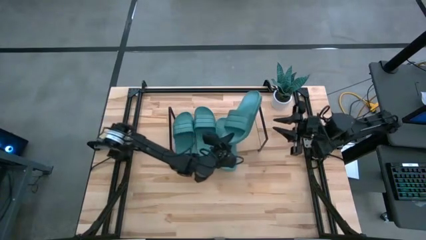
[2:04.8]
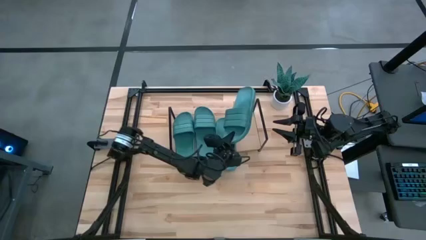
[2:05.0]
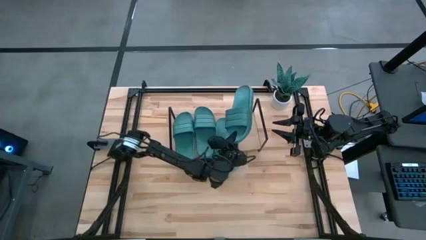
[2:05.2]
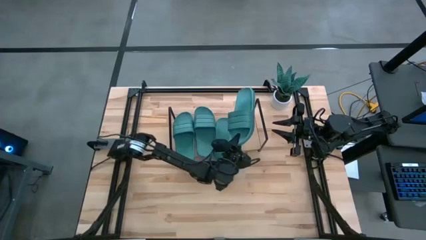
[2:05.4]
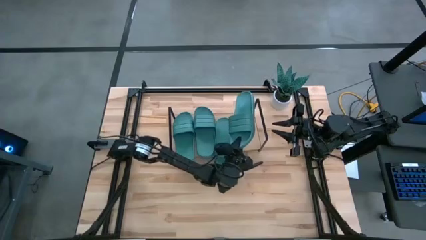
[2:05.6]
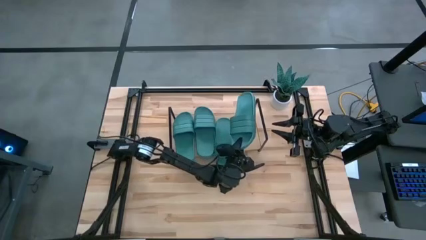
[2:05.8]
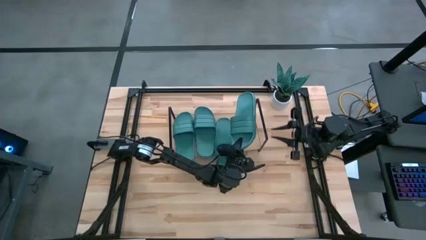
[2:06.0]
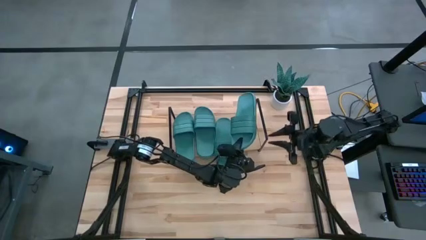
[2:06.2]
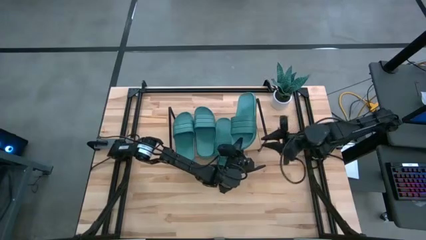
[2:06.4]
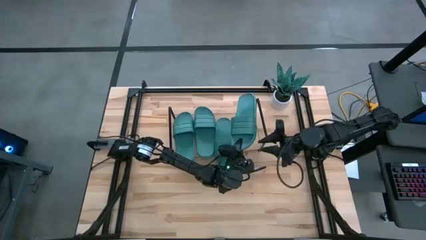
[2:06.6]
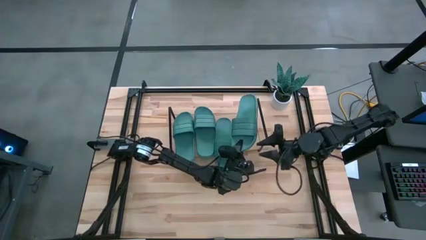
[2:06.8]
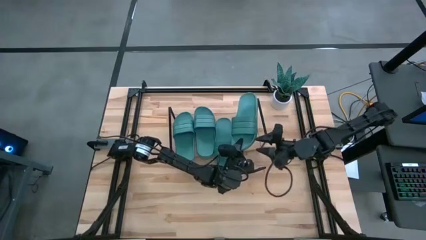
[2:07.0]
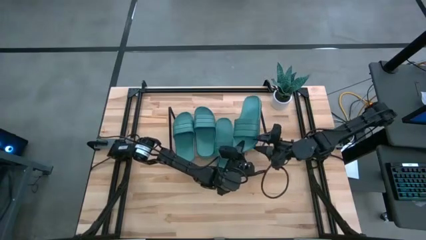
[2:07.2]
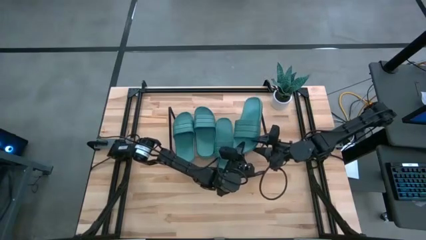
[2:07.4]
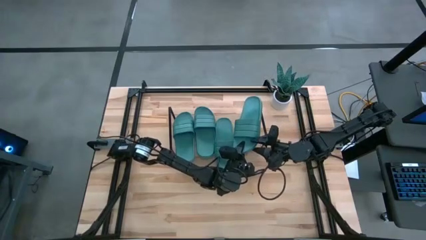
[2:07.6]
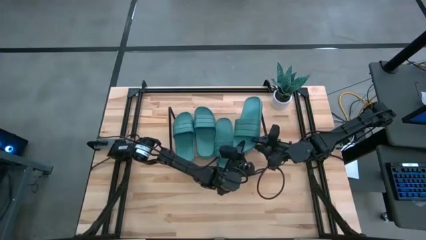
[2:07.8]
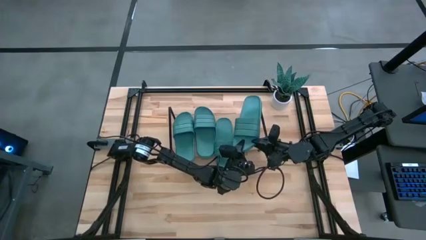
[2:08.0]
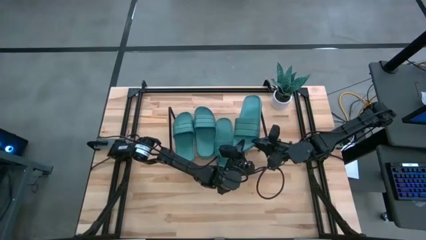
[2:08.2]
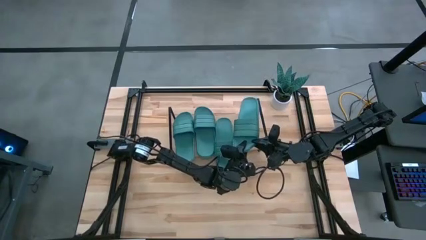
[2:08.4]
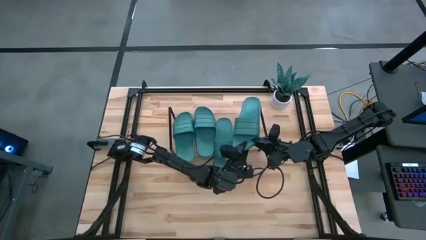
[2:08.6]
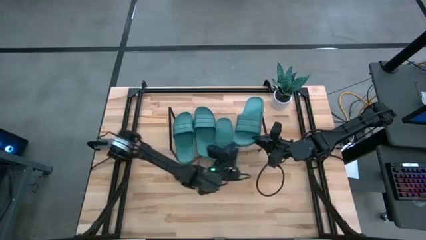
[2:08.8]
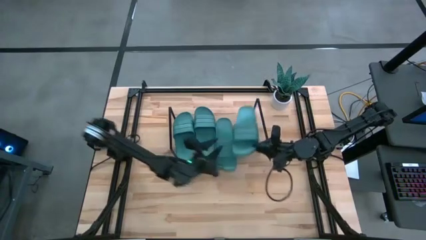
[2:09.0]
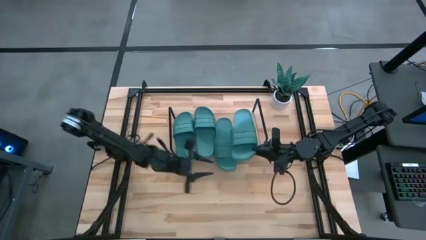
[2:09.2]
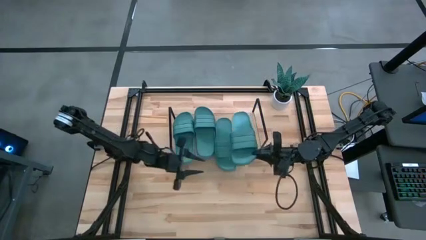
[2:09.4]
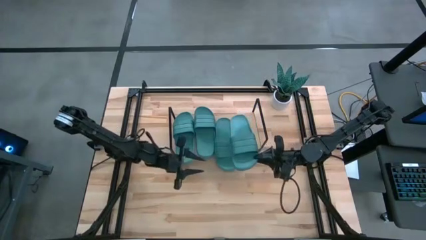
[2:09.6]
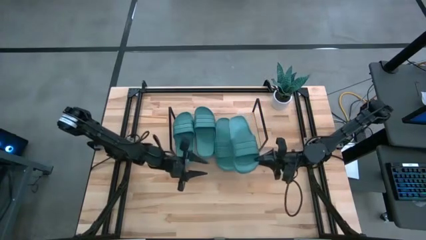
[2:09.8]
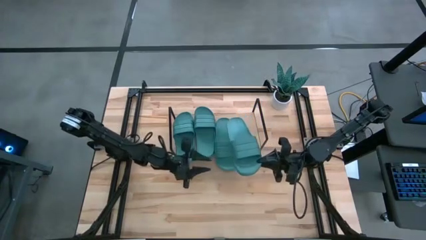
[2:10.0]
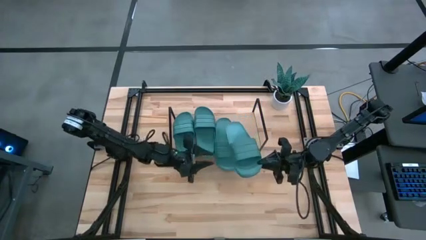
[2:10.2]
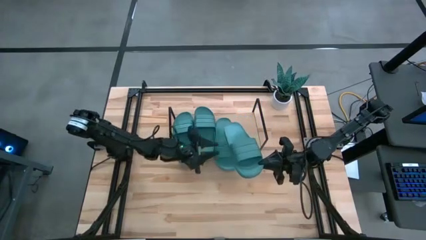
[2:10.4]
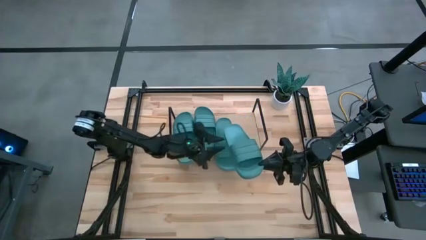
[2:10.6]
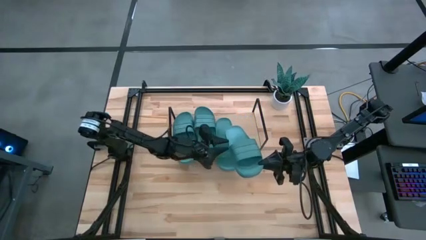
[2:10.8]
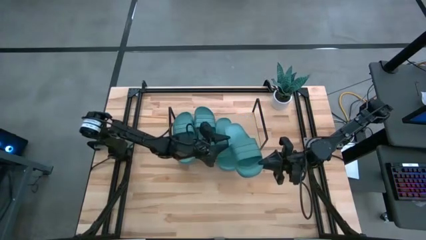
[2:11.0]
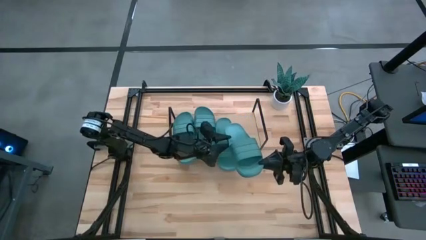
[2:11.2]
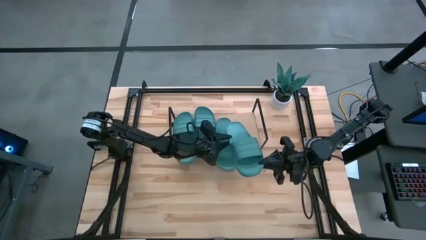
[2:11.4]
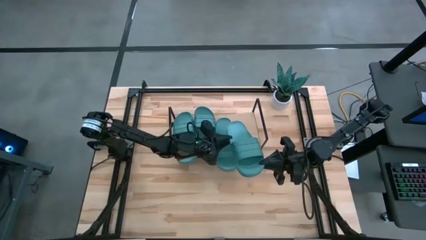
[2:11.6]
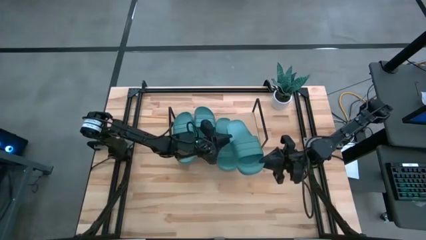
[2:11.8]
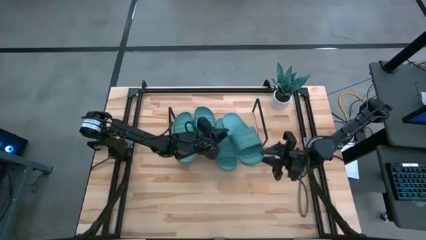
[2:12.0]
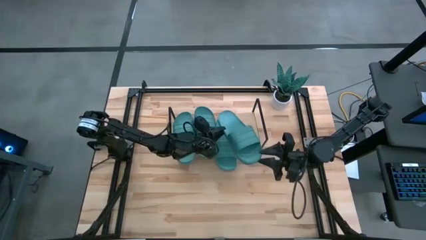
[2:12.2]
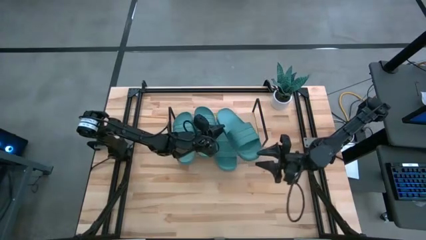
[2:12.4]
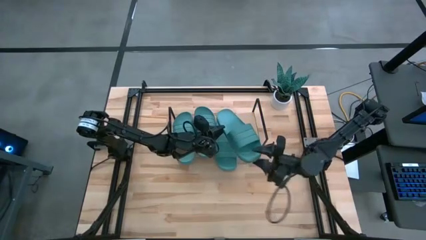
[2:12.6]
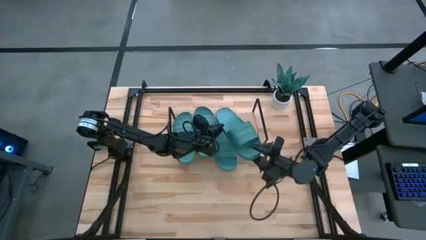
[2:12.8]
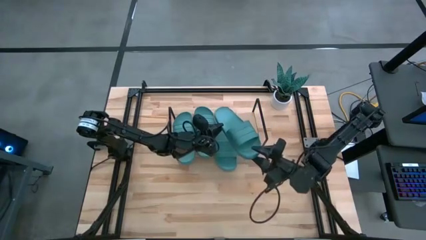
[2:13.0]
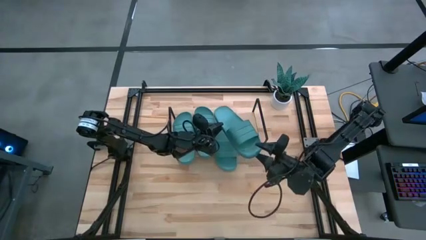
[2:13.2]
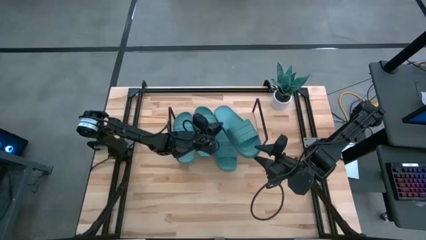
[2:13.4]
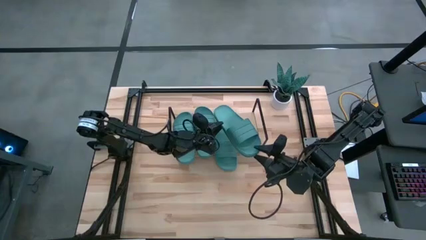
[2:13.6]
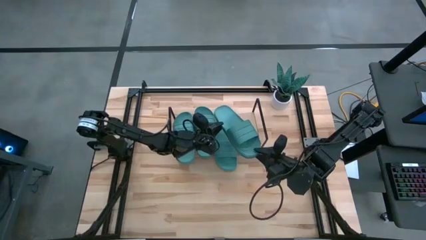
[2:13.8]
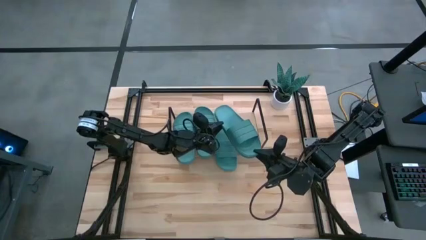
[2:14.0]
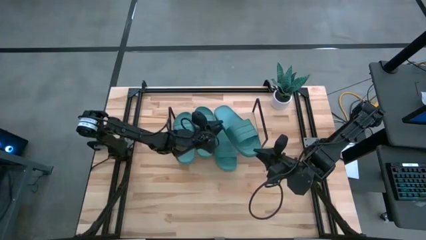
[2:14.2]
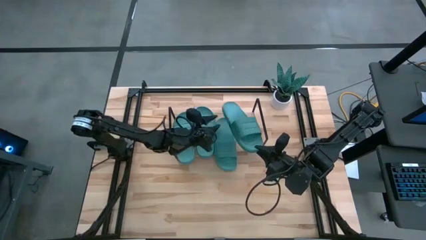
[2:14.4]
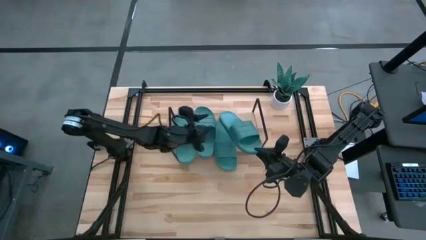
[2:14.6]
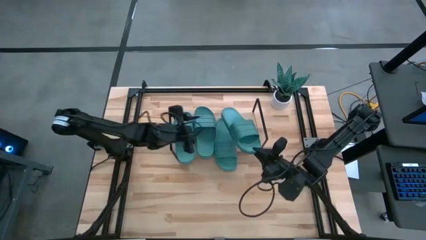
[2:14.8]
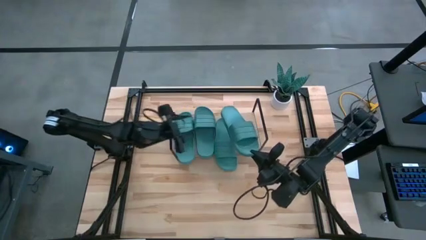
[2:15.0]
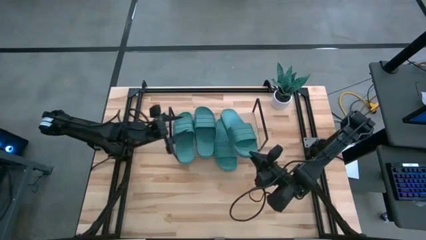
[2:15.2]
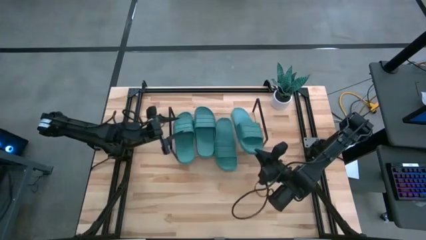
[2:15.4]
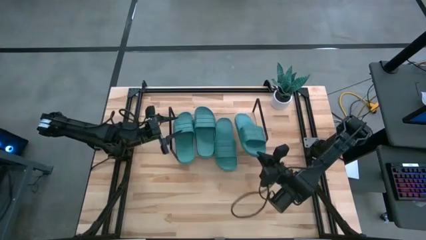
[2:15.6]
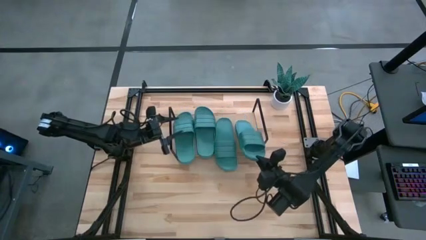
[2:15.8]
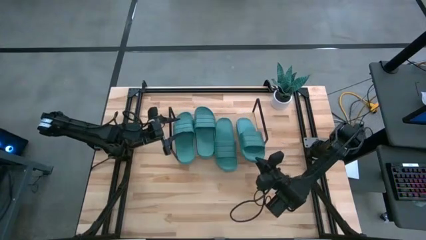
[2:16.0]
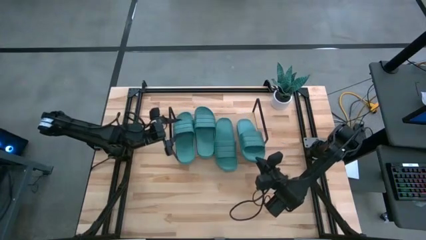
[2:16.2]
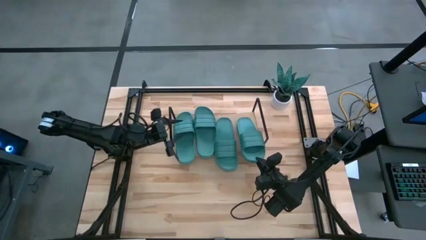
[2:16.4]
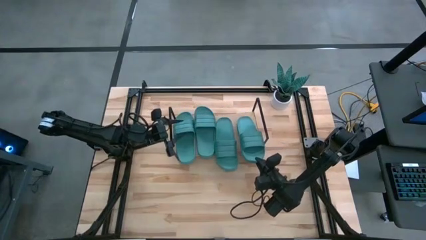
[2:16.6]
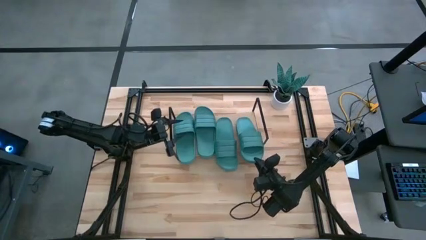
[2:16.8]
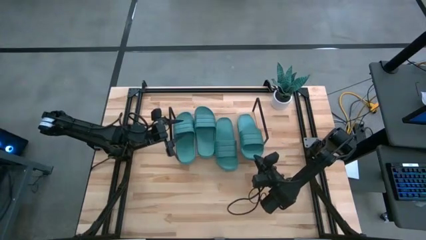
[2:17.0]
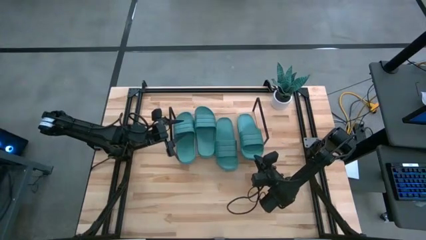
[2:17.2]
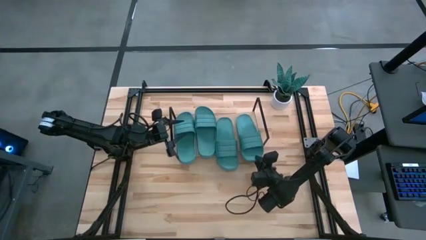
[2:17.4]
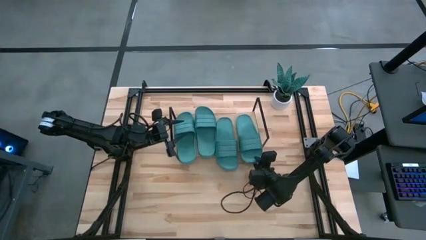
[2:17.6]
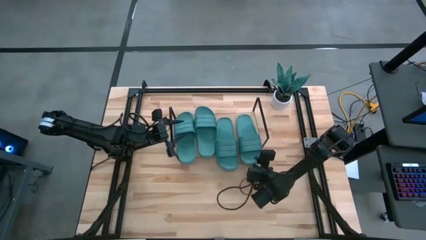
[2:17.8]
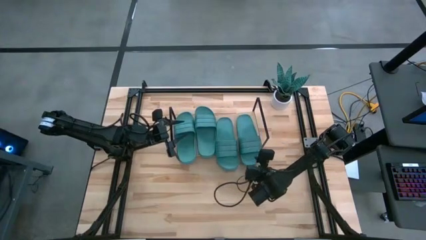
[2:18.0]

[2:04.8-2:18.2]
Task: Pick and place slides into the shelf
Put the green slipper on the shelf

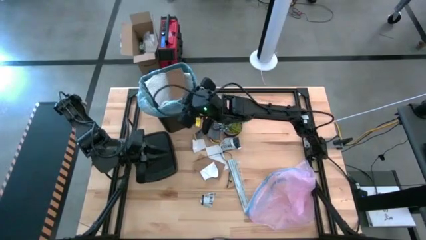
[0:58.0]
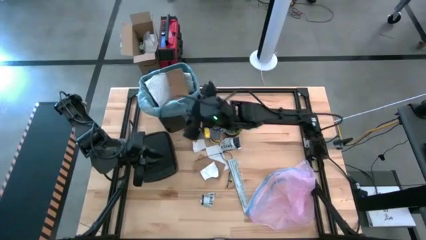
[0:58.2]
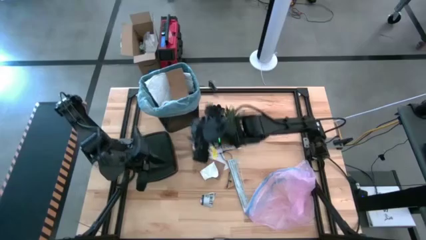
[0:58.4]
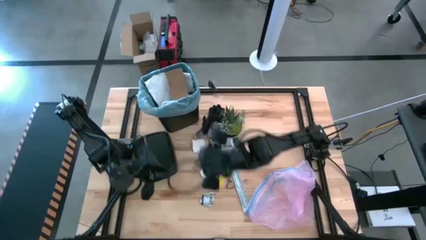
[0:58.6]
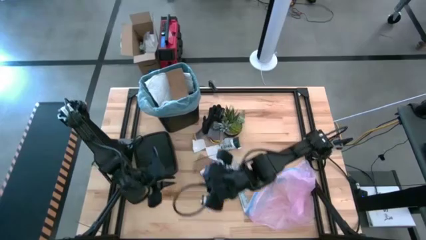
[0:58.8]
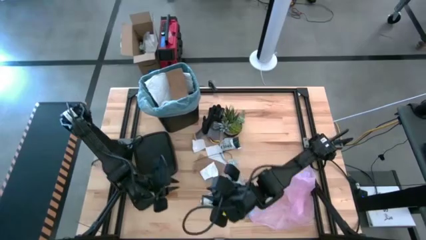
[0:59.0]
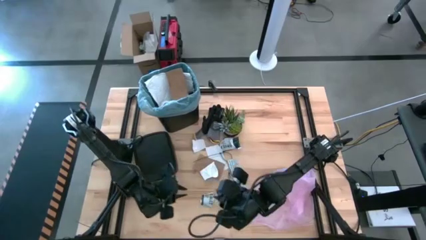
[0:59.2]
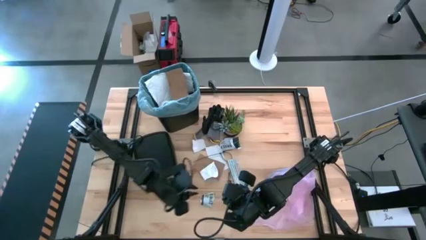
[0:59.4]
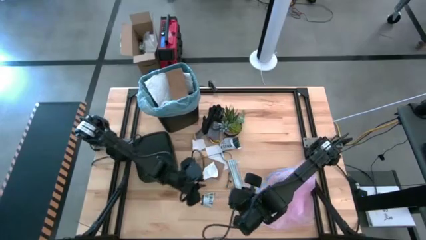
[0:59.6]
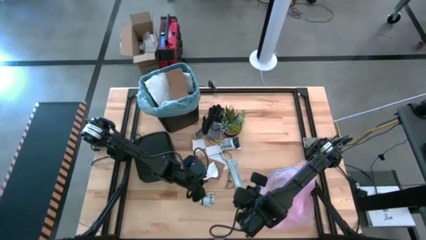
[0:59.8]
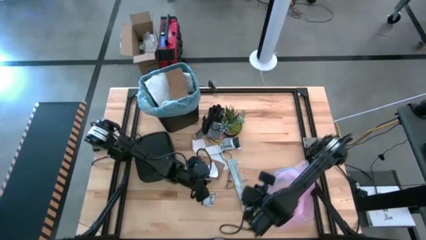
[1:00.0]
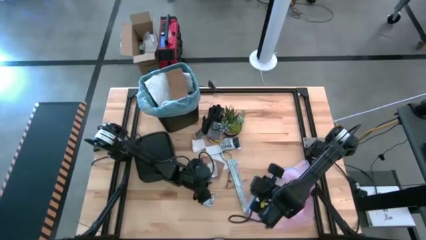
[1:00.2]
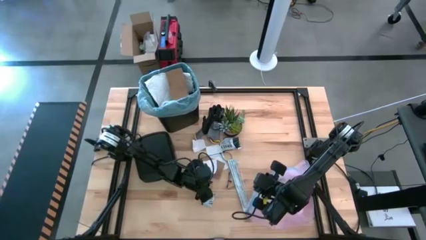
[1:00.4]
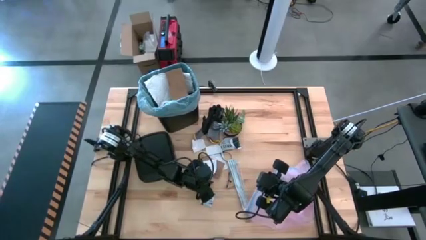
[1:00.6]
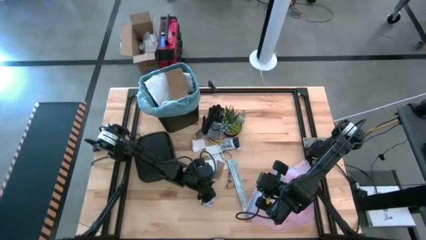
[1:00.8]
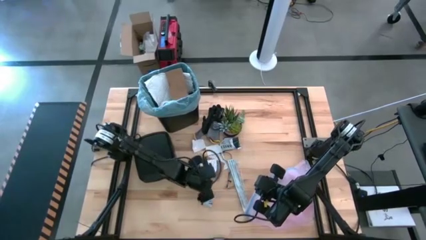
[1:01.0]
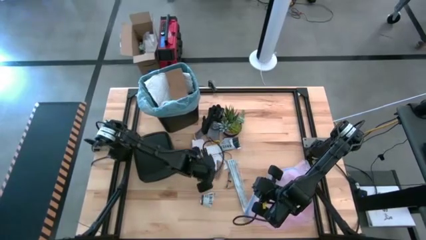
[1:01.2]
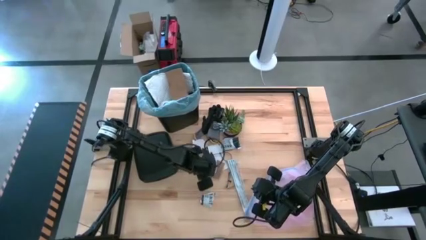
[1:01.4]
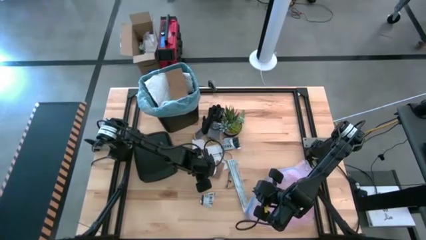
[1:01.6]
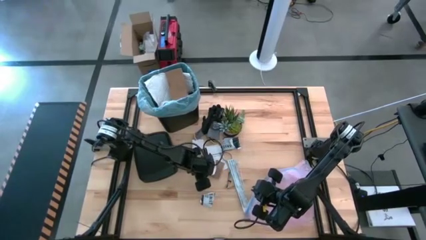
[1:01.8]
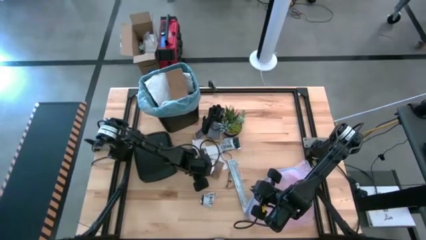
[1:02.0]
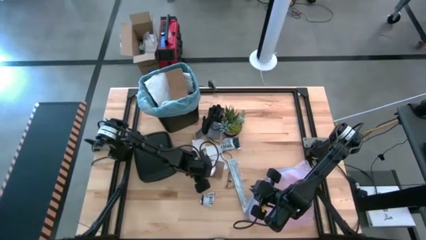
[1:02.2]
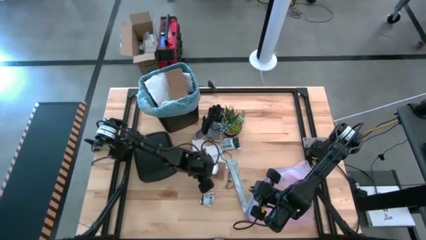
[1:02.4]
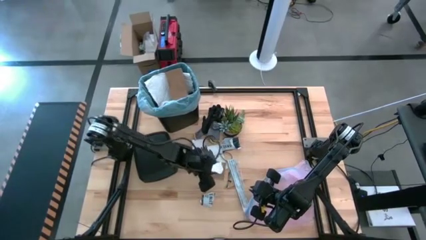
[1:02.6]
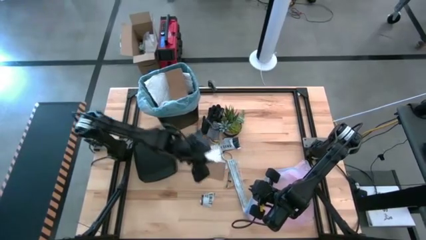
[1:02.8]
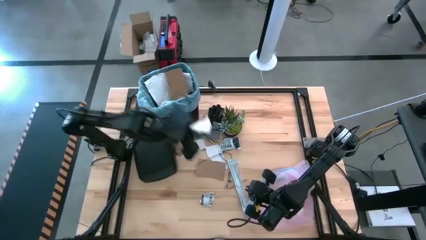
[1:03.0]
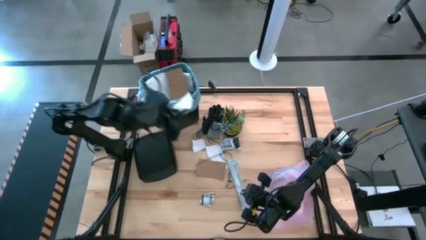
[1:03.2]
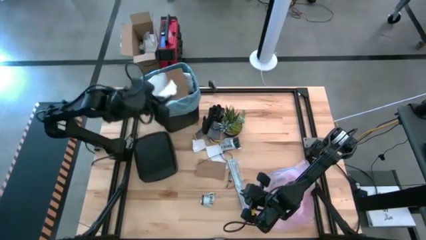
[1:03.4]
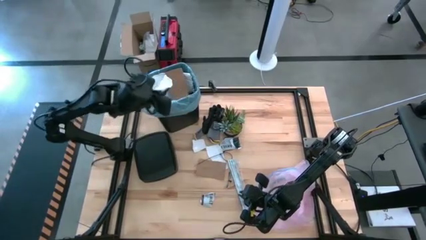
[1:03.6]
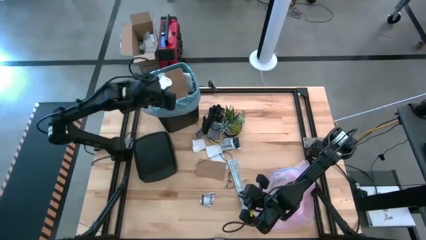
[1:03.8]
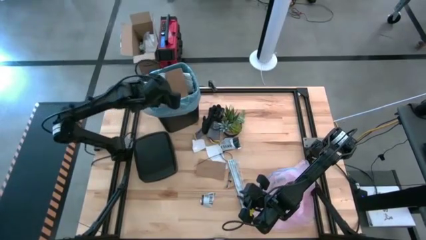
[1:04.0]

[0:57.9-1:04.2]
Task: place trash/remove bag and relplace
Put the white paper into the trash bin
